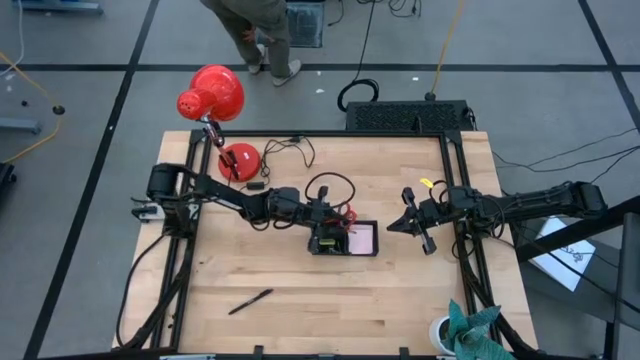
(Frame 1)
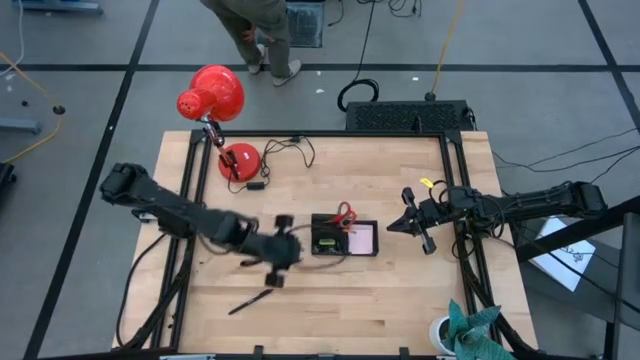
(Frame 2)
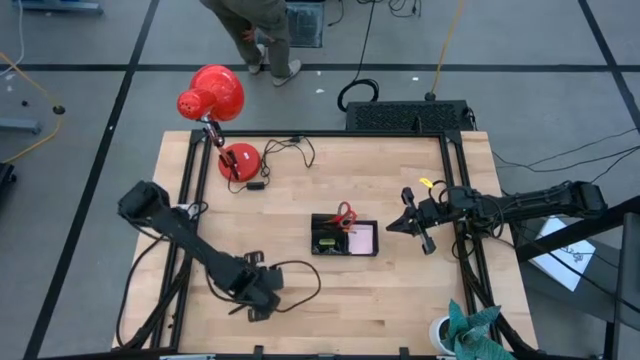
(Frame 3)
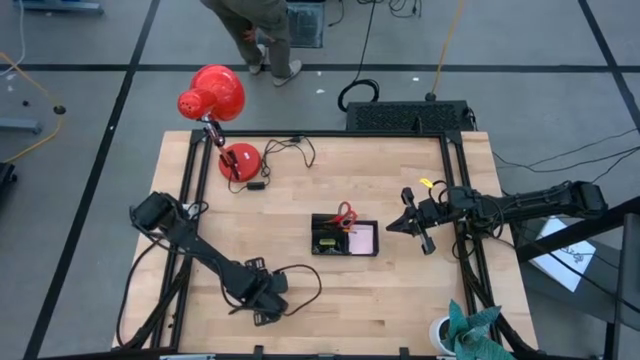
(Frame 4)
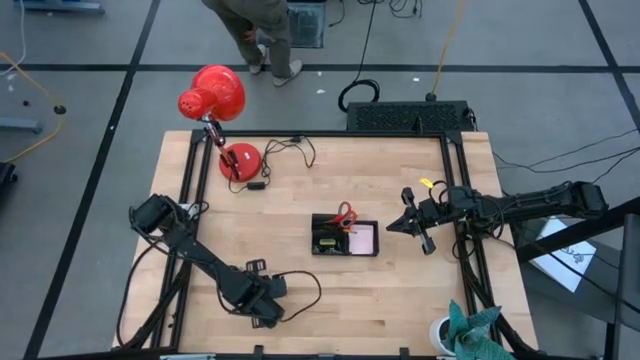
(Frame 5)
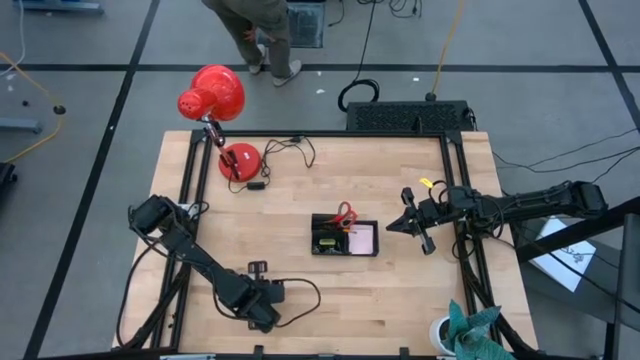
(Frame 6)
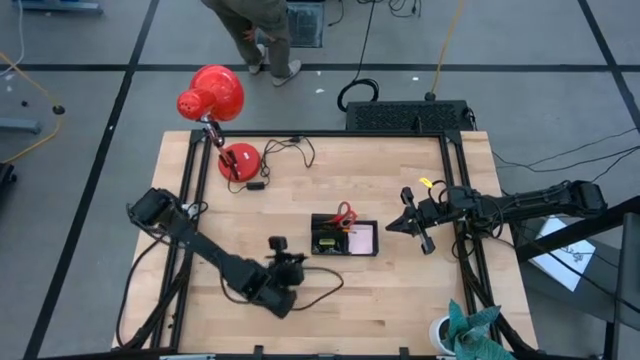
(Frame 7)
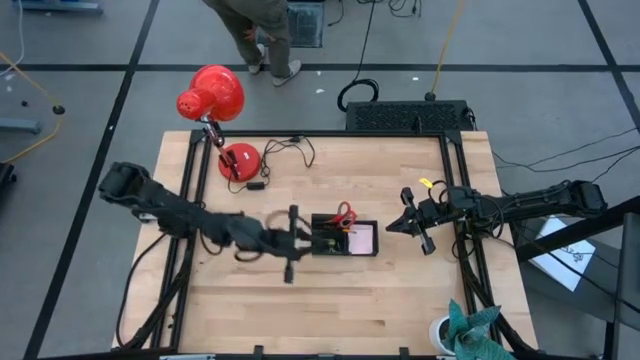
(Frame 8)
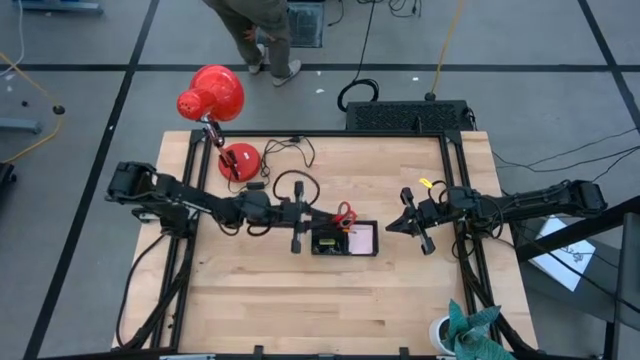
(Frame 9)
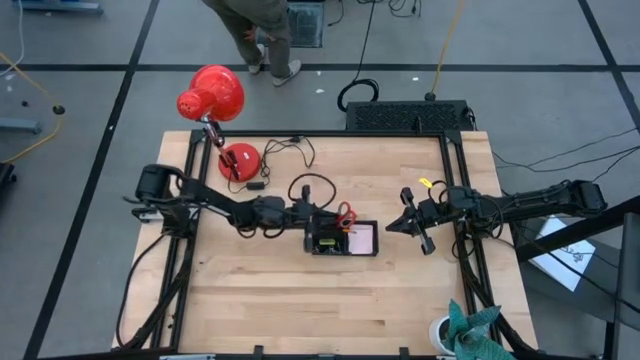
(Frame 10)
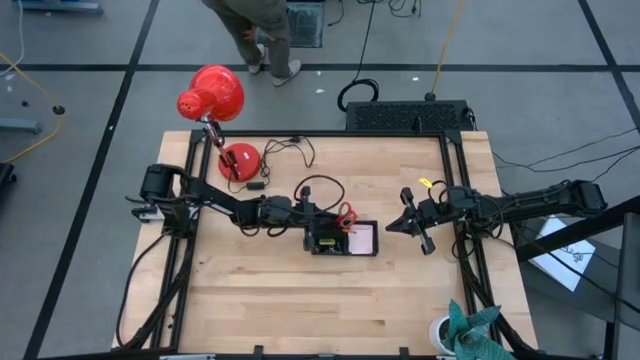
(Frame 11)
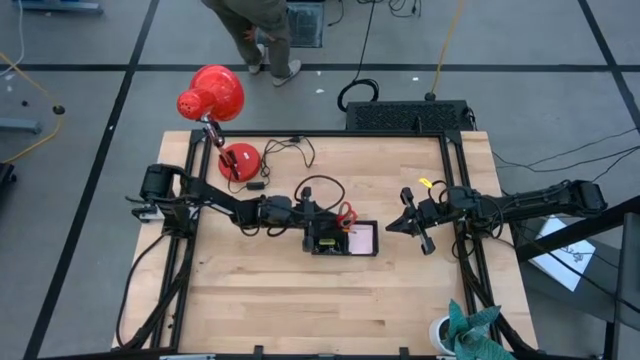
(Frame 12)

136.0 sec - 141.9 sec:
Task: Pick and place office supplies into organizer
Put the black pen into the black desk organizer

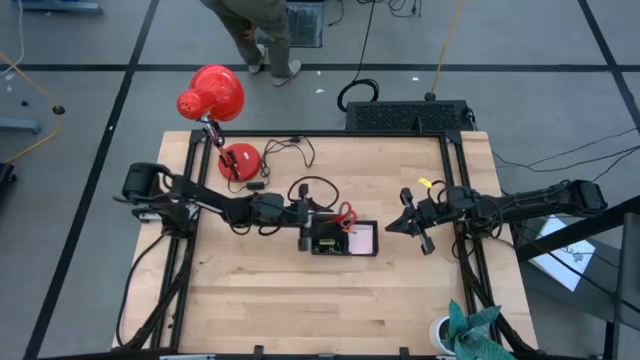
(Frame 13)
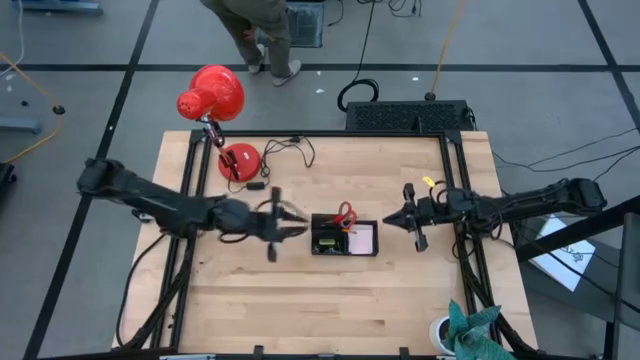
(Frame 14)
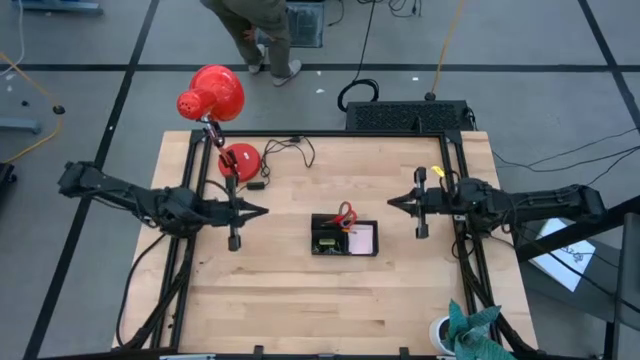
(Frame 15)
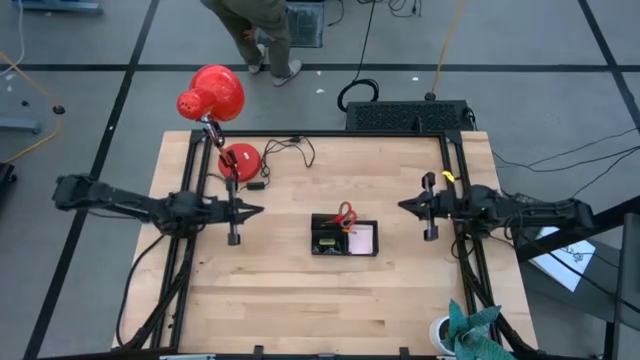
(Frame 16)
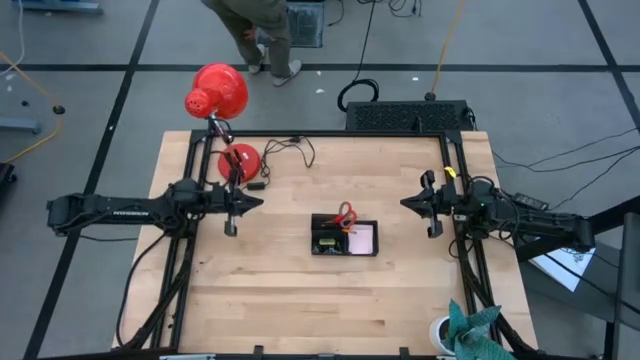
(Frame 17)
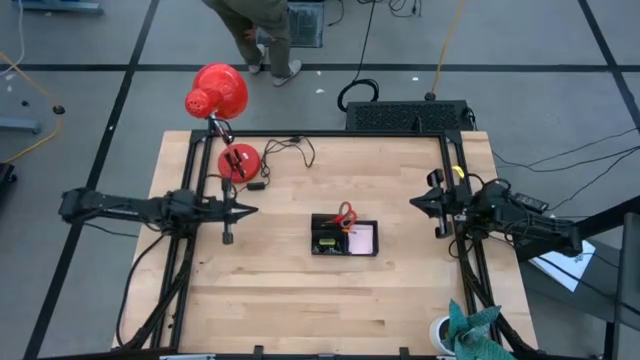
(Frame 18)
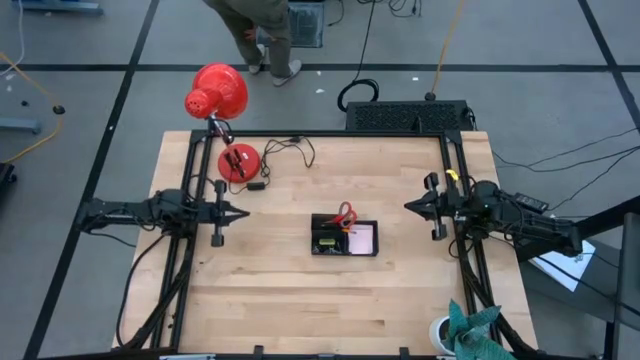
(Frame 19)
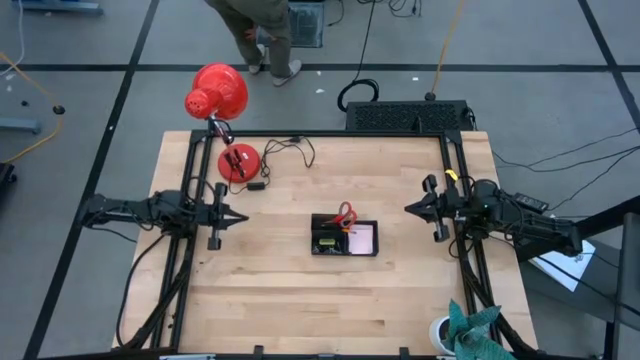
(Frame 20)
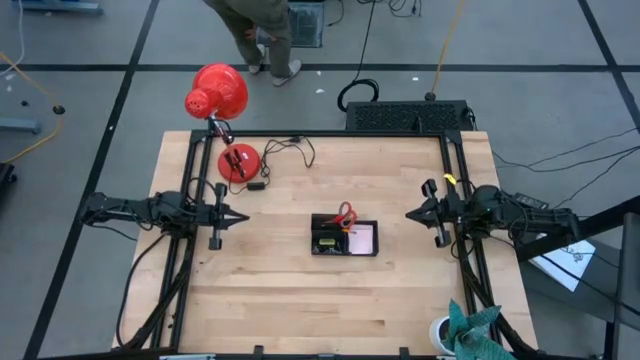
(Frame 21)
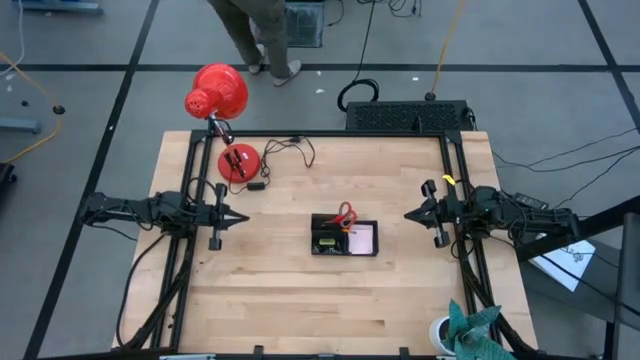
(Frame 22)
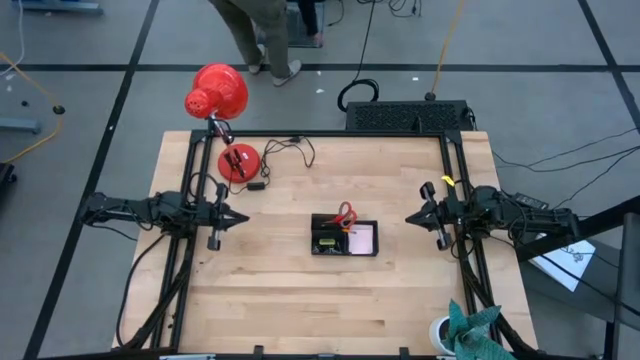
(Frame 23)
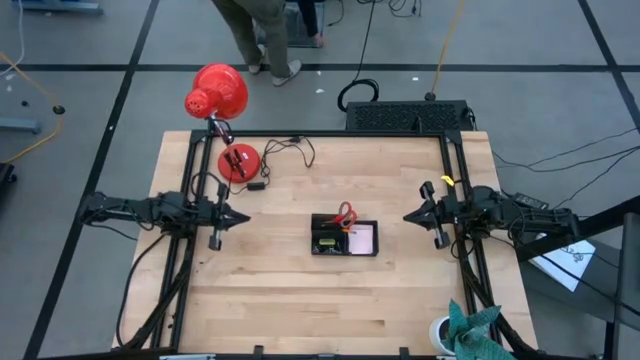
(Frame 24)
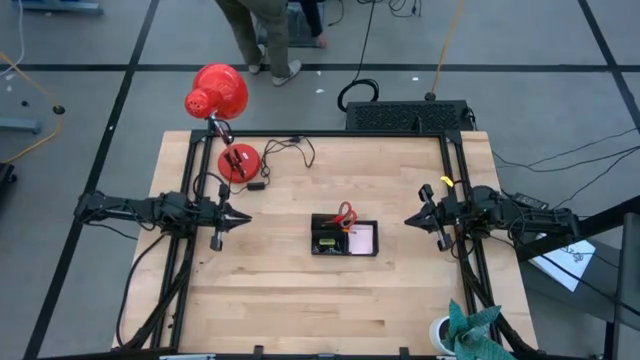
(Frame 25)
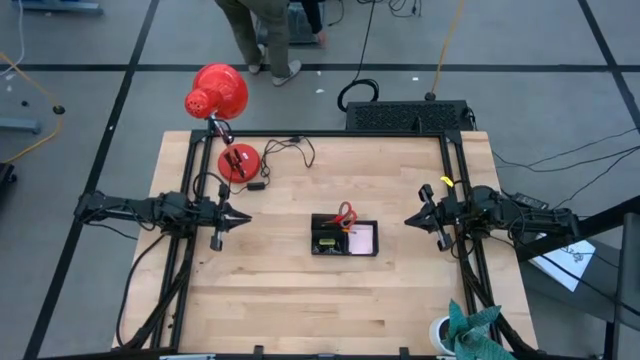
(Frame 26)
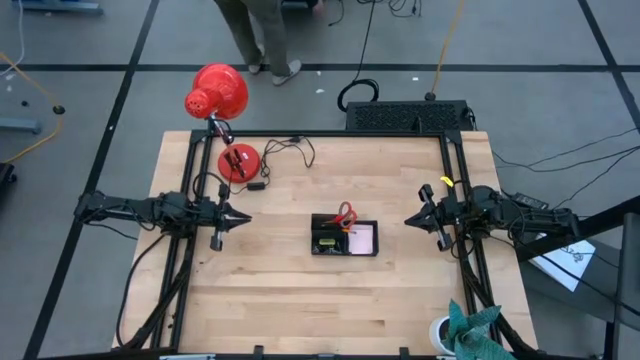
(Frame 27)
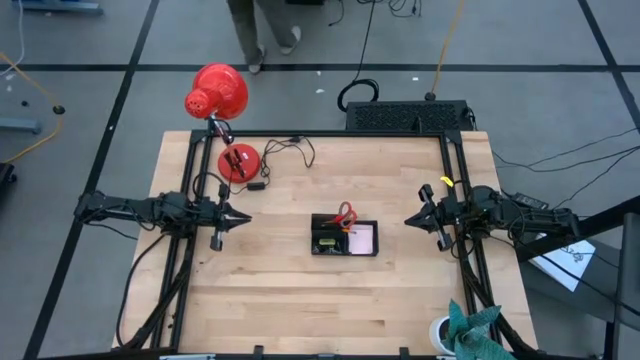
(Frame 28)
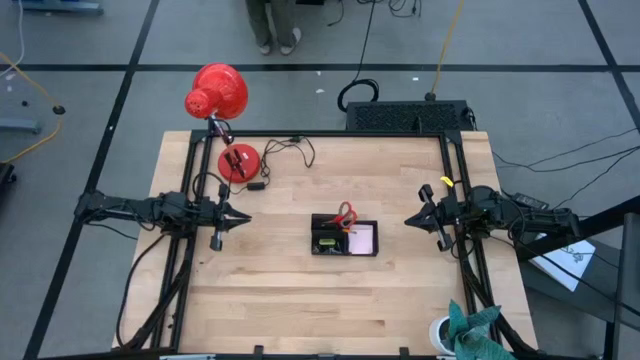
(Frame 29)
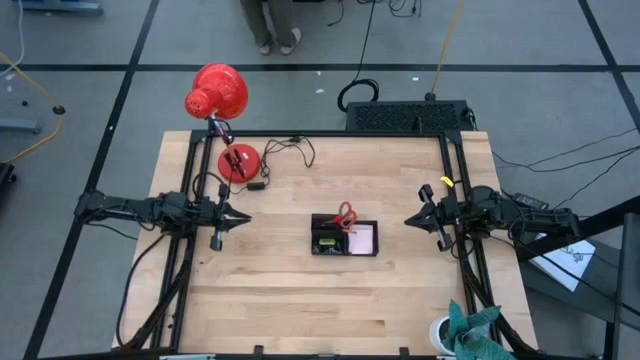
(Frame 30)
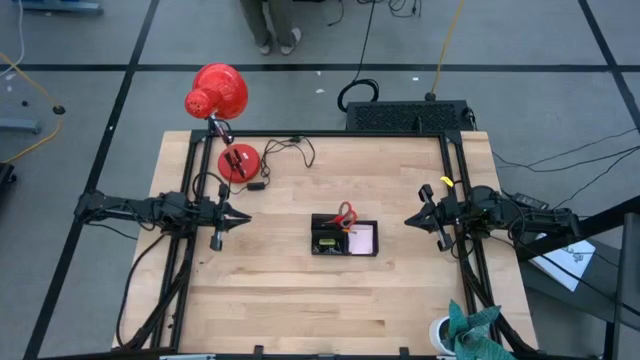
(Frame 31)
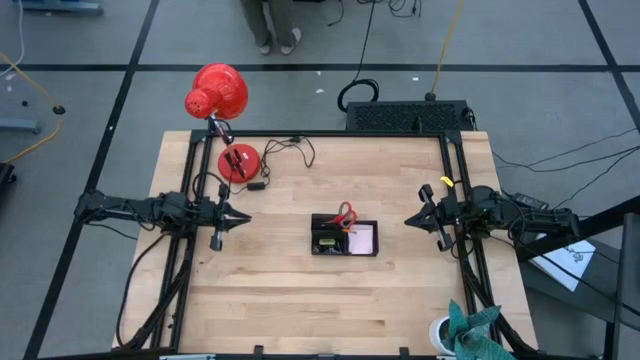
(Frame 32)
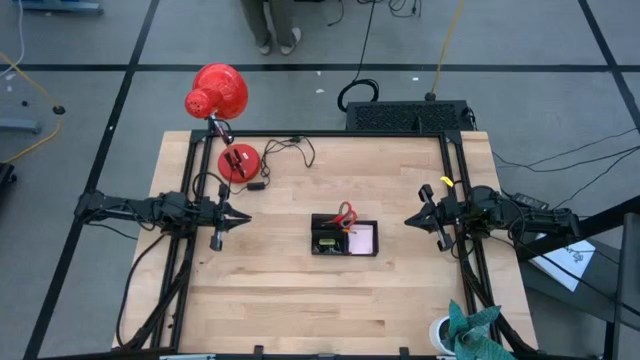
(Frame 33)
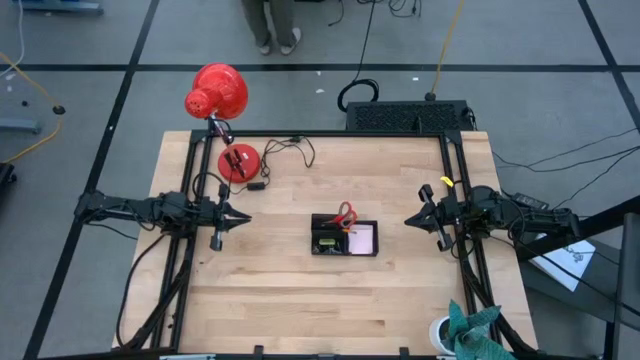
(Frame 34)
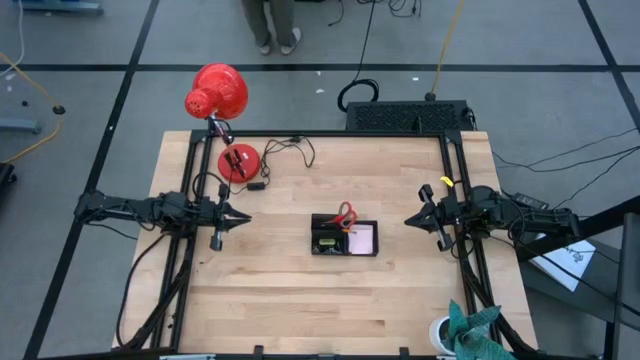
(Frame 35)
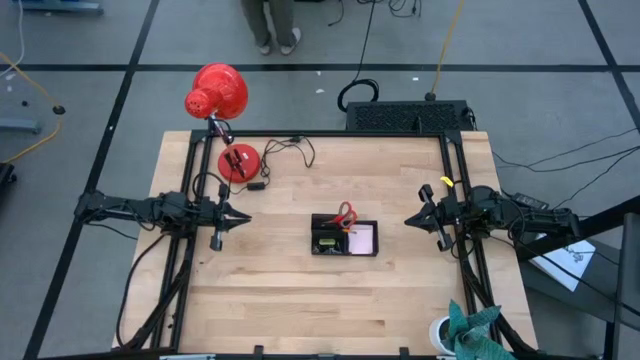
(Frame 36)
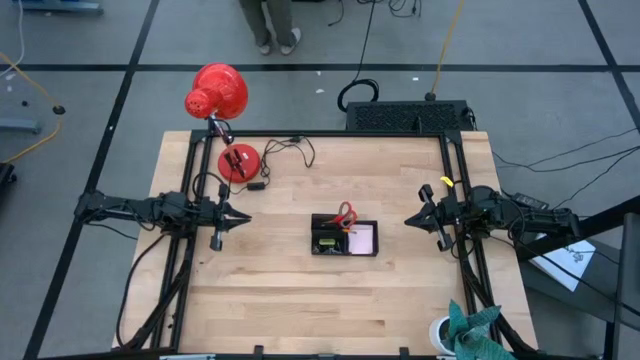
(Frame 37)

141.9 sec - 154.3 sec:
Return to Home Position

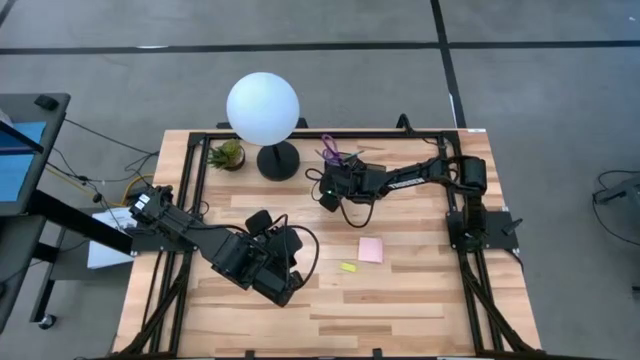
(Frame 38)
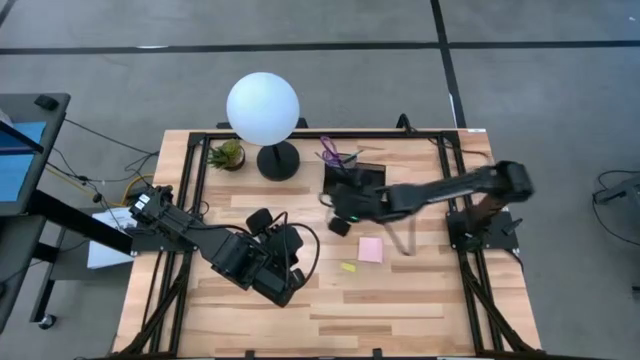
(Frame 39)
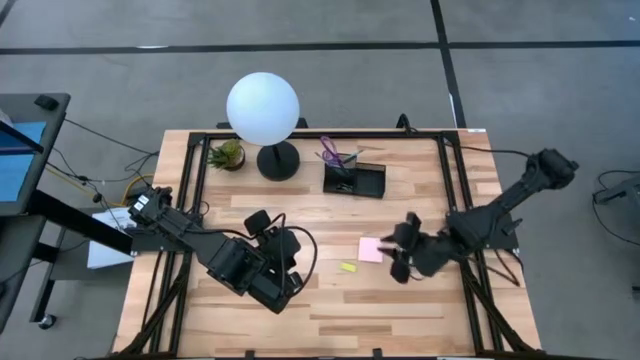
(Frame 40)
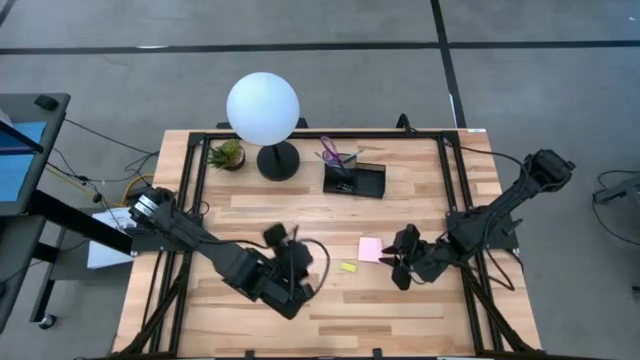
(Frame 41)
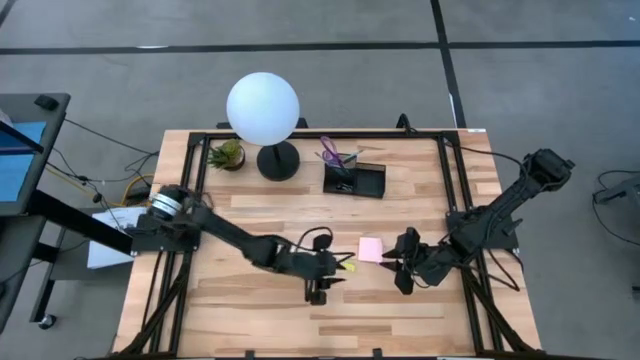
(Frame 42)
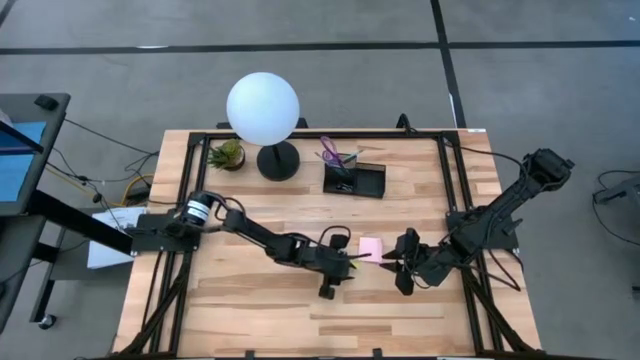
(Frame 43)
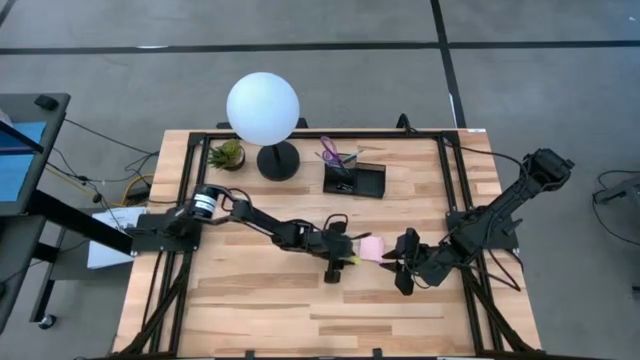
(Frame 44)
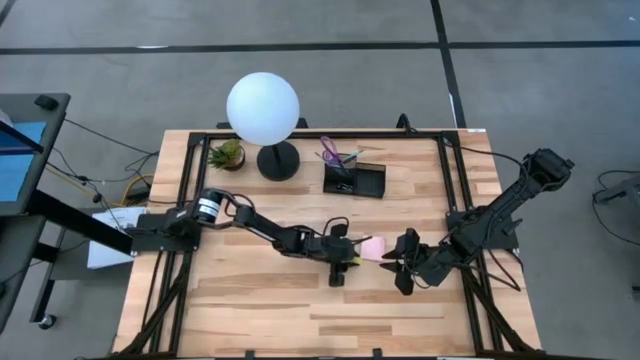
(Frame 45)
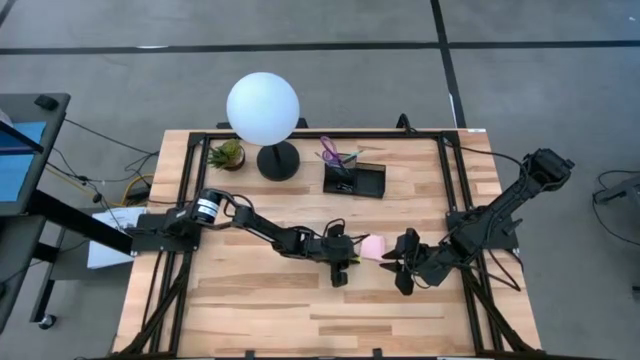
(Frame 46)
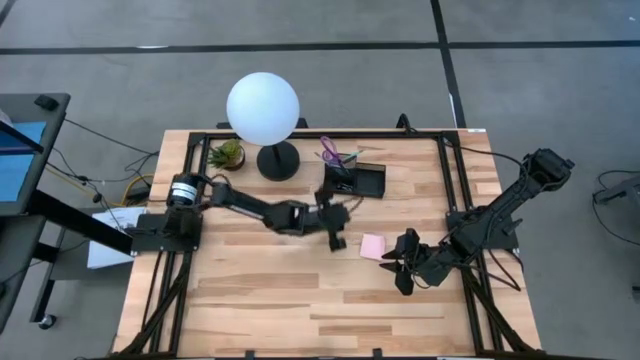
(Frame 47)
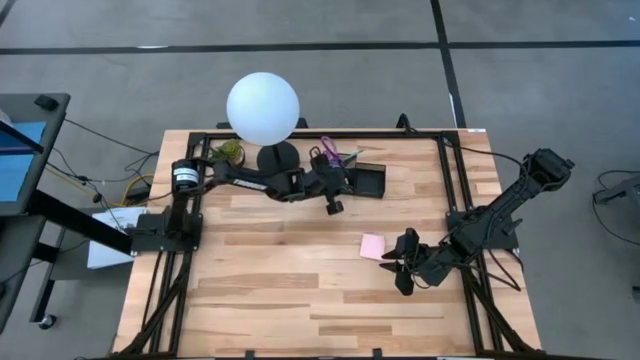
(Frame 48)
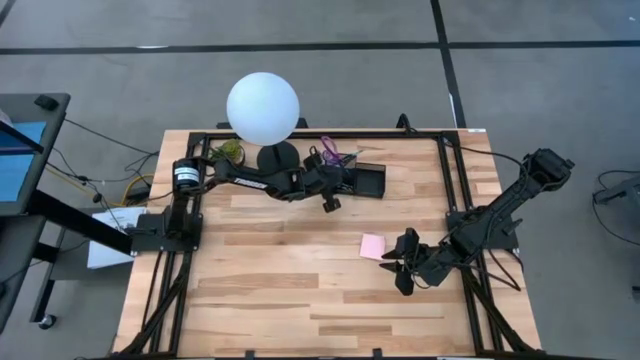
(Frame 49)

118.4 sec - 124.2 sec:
Task: Pick and place office supplies into organizer
Put the green eraser into the black desk organizer
